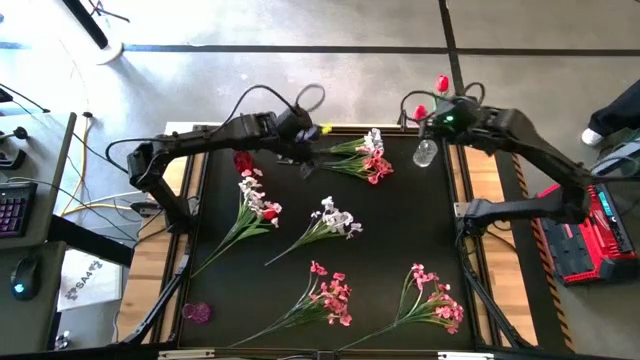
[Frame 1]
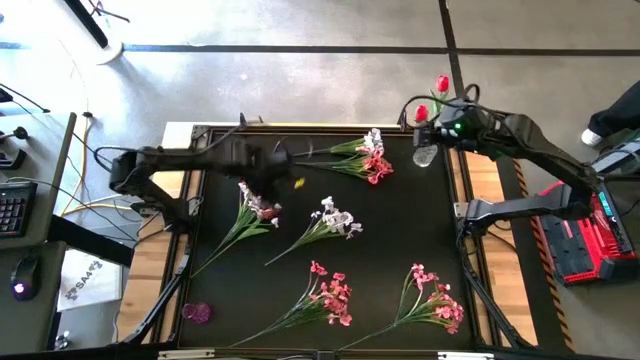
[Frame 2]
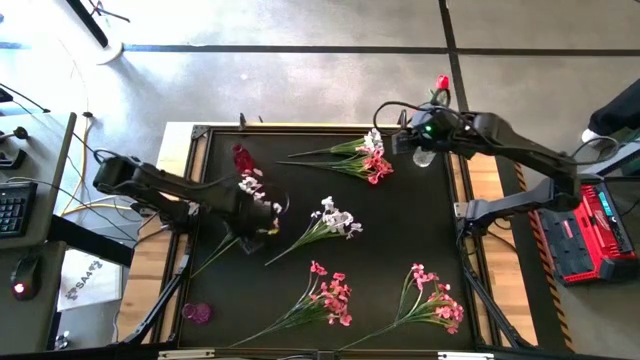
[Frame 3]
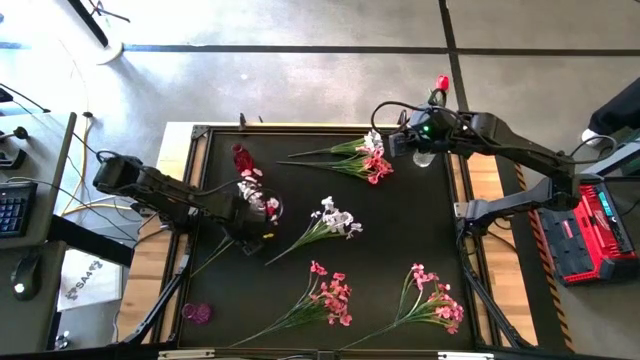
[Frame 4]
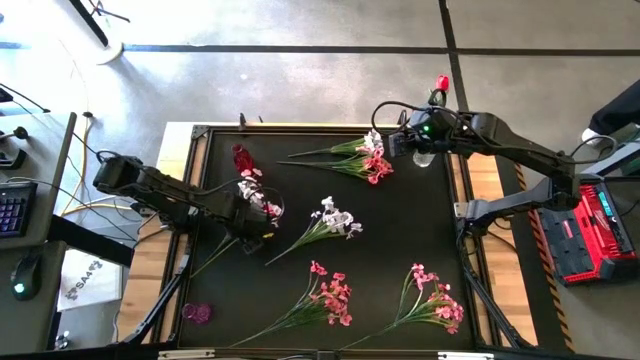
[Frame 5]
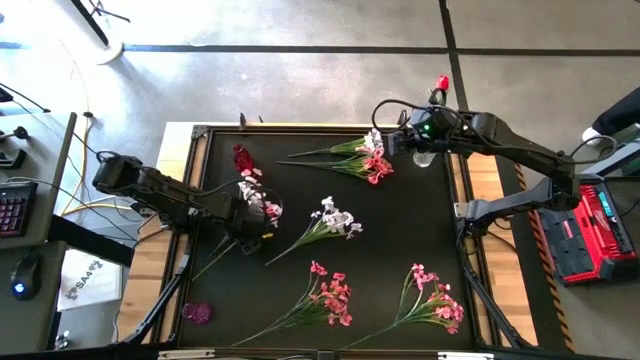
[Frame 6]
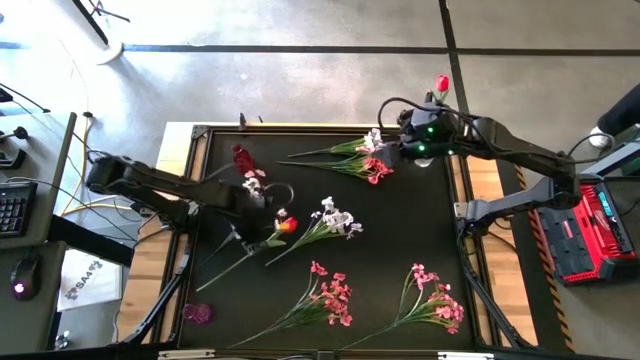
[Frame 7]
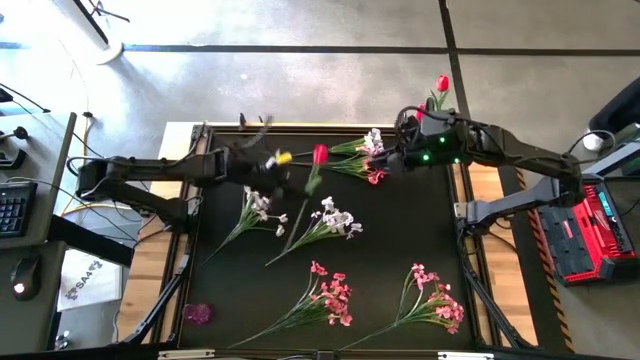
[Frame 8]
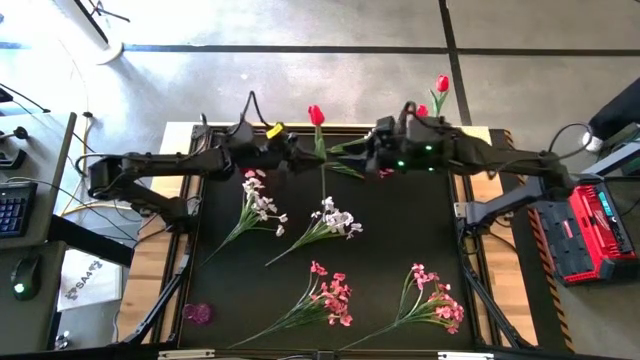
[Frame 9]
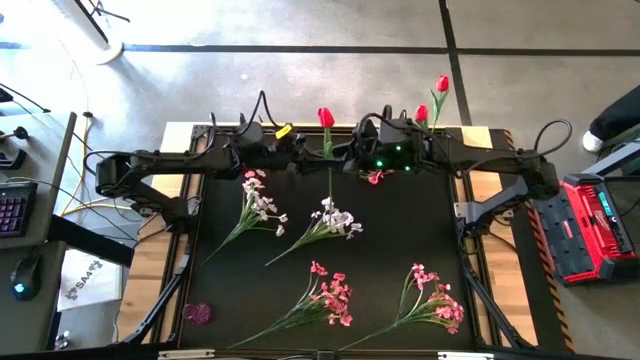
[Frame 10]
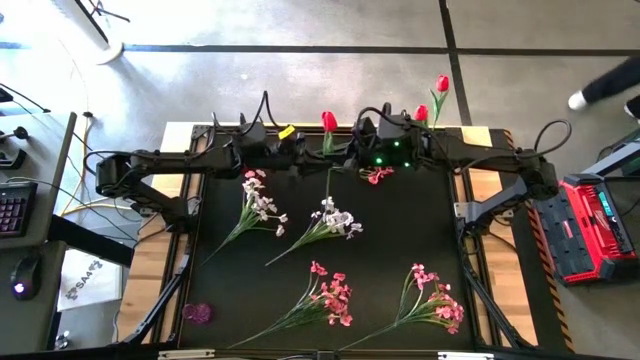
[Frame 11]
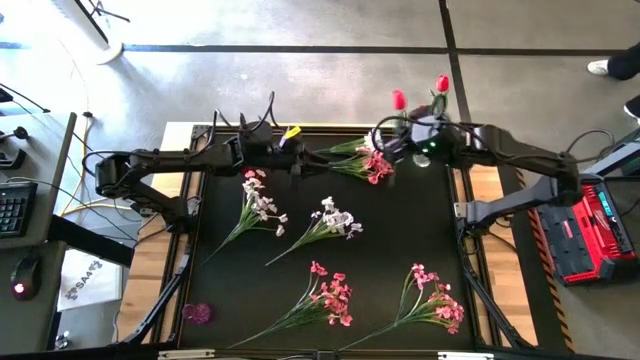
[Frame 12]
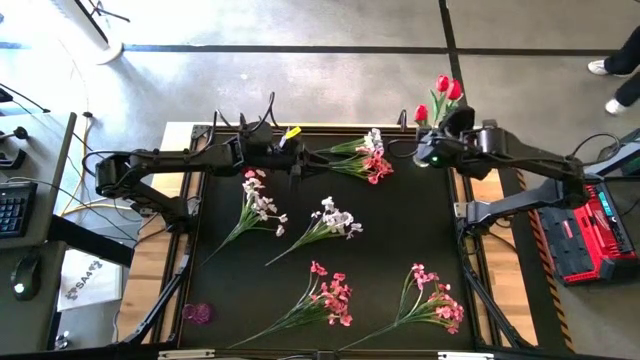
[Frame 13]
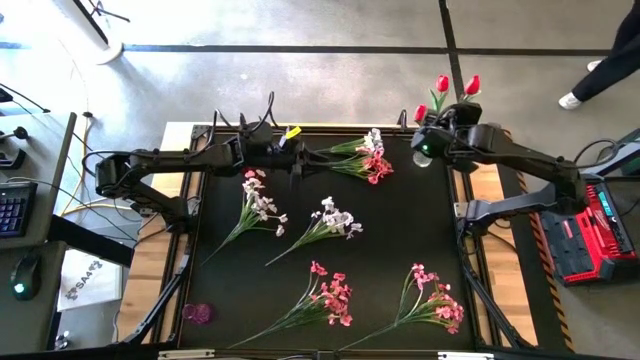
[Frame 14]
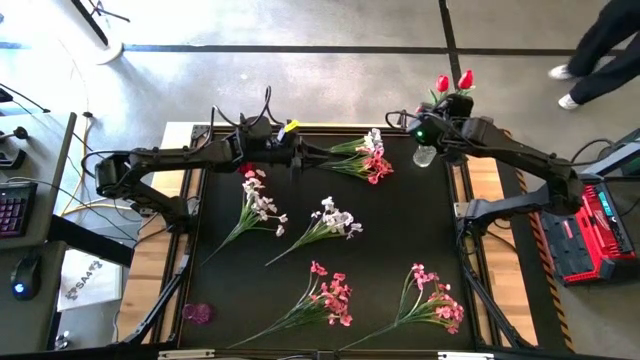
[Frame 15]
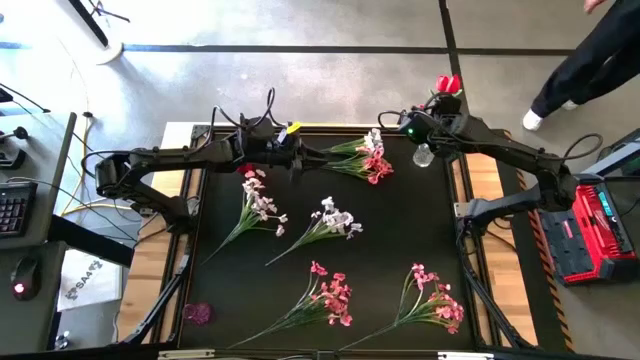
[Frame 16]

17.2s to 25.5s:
Task: Sort flowers into vase by color
Put the red tulip into the transparent vase

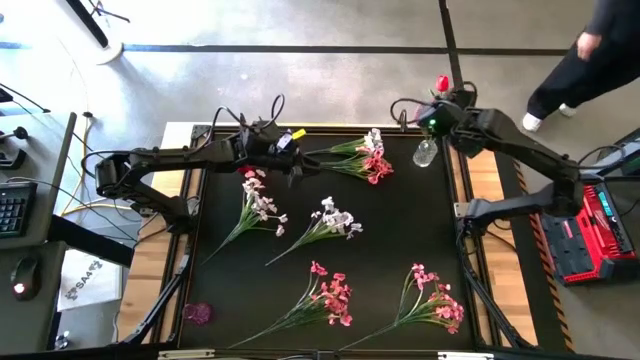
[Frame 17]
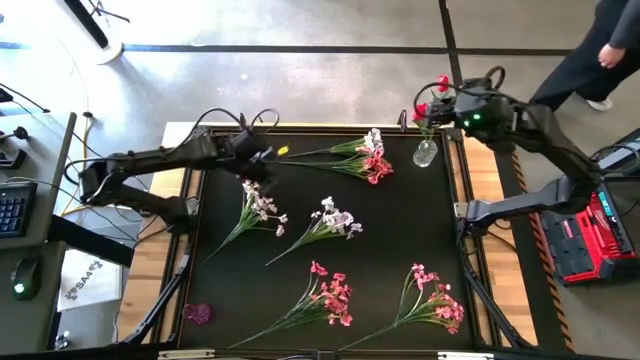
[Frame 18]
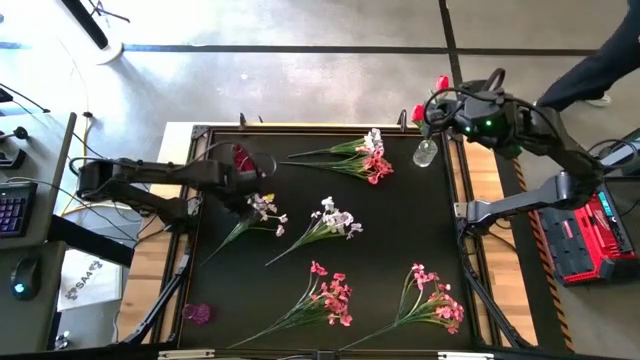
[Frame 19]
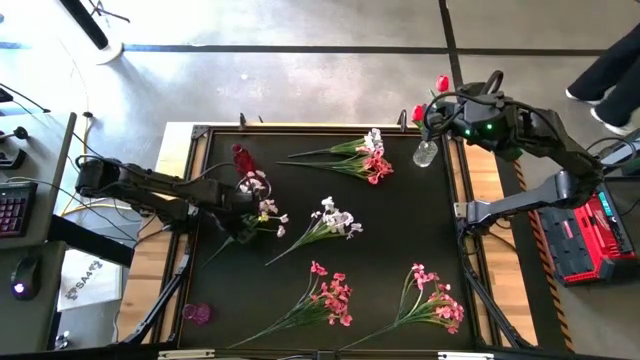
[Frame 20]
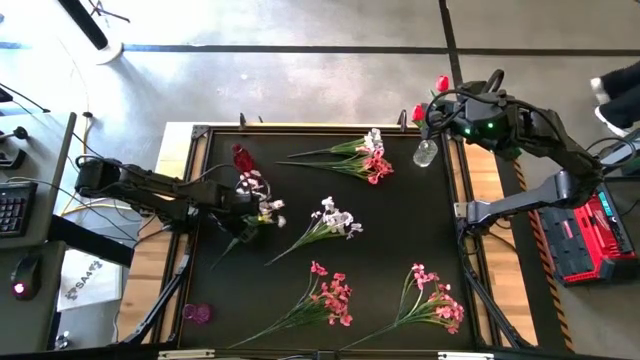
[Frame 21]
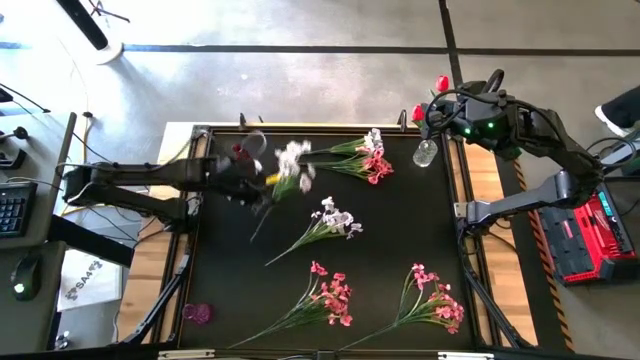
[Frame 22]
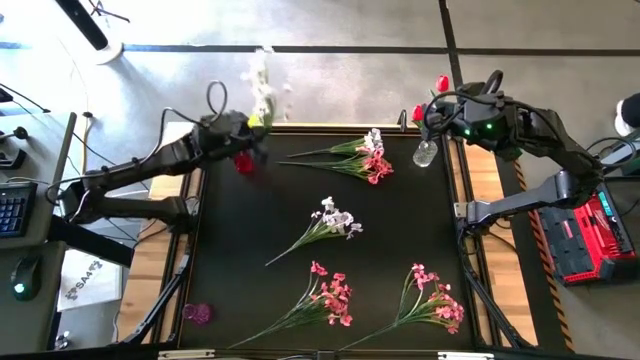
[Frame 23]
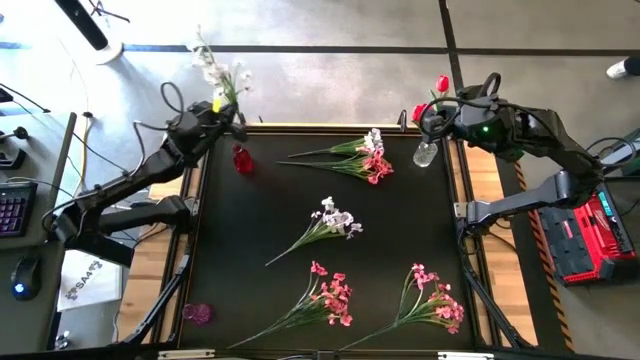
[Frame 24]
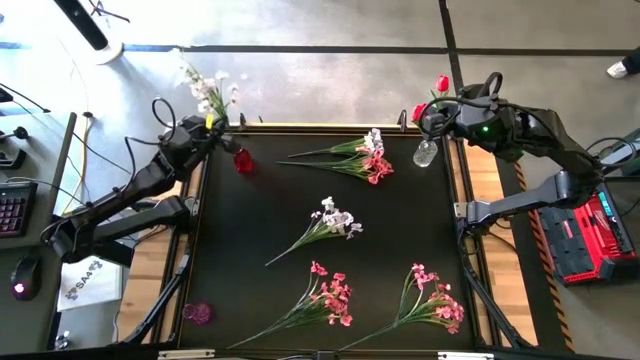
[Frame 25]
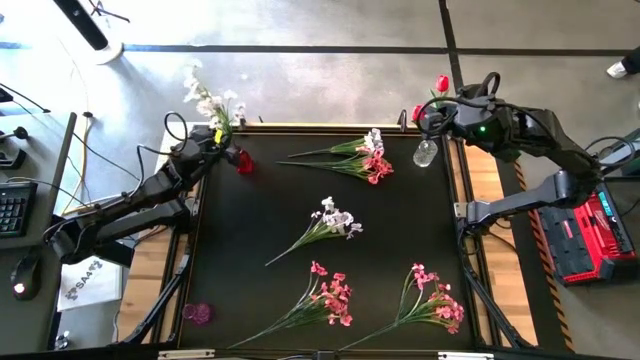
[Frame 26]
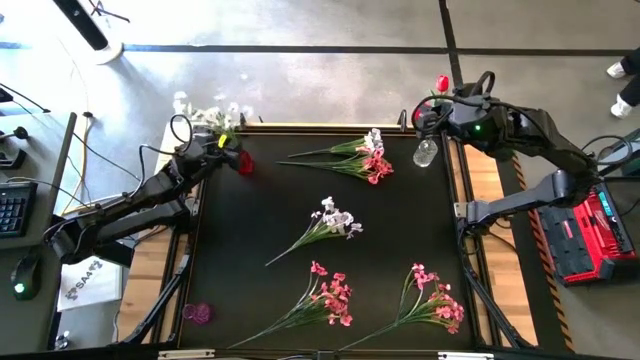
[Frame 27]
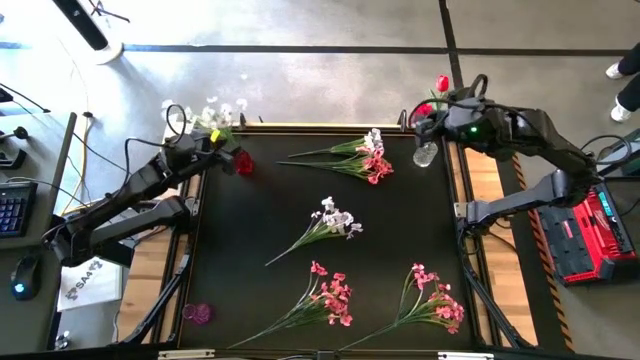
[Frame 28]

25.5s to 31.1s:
Put the left white flowers into the red vase

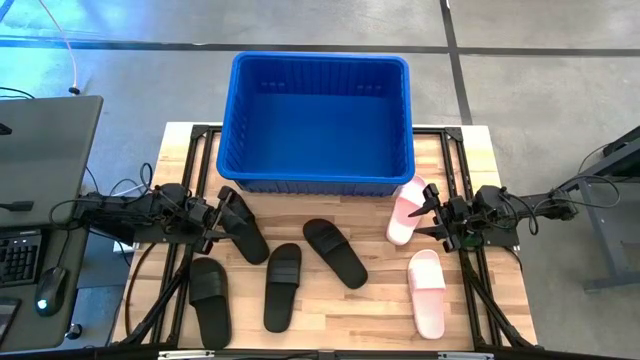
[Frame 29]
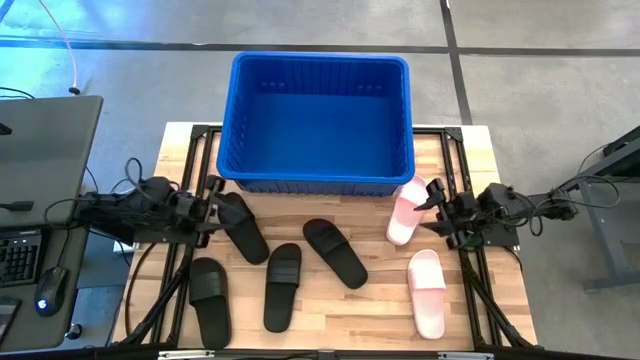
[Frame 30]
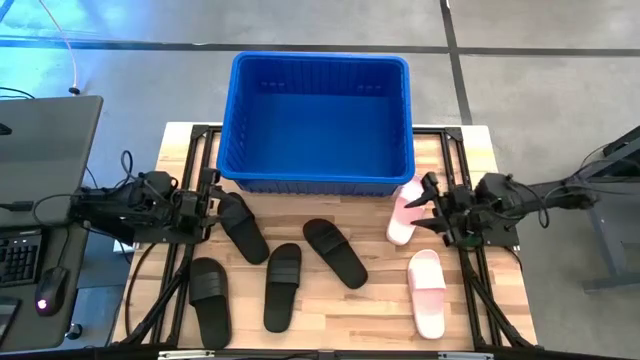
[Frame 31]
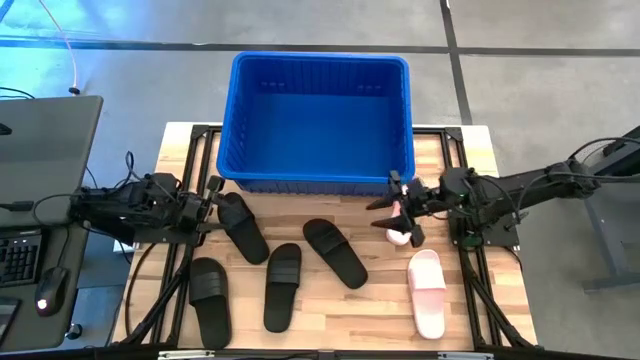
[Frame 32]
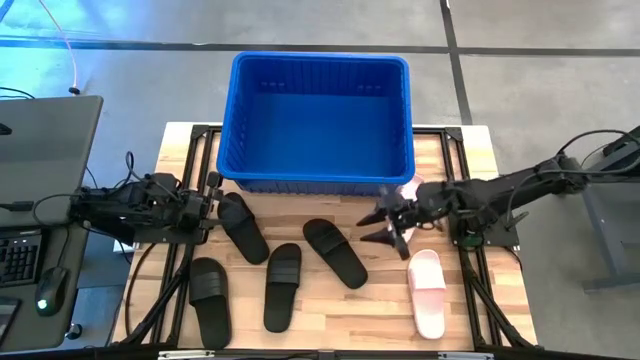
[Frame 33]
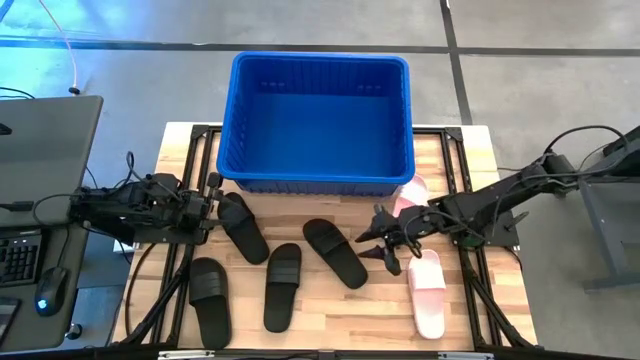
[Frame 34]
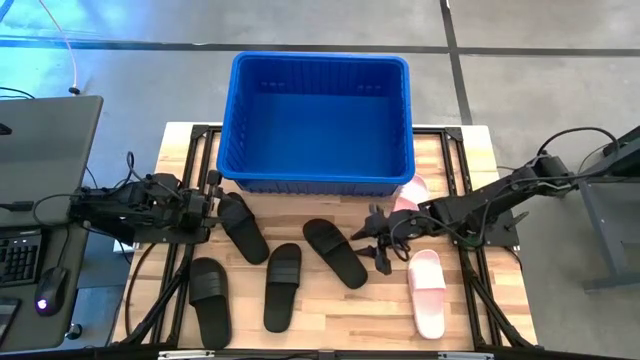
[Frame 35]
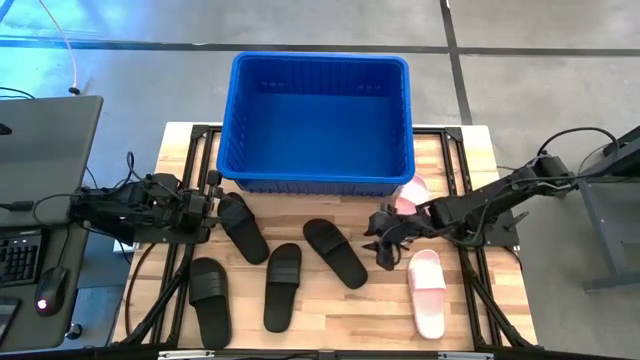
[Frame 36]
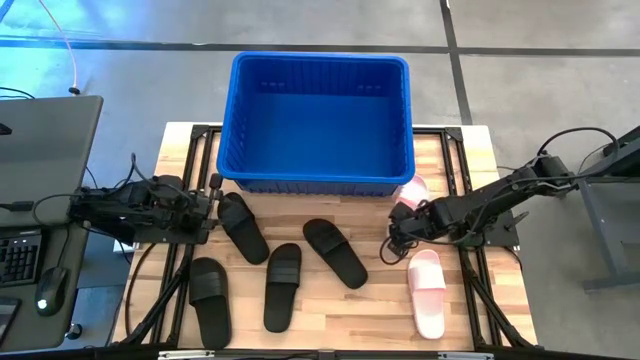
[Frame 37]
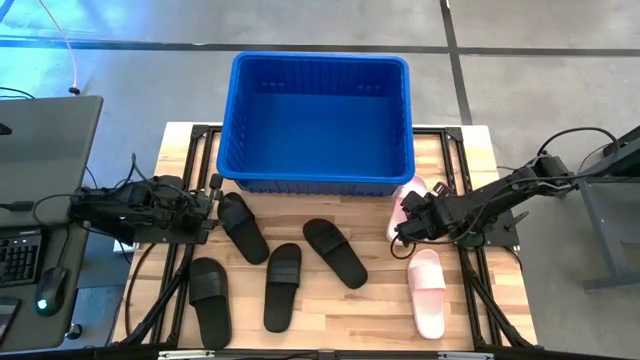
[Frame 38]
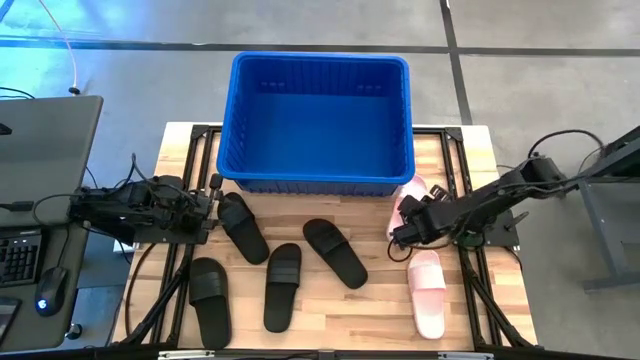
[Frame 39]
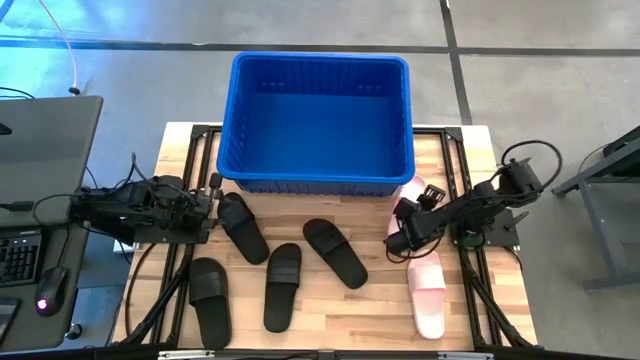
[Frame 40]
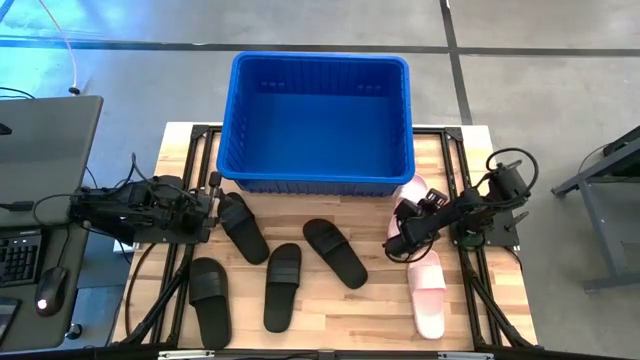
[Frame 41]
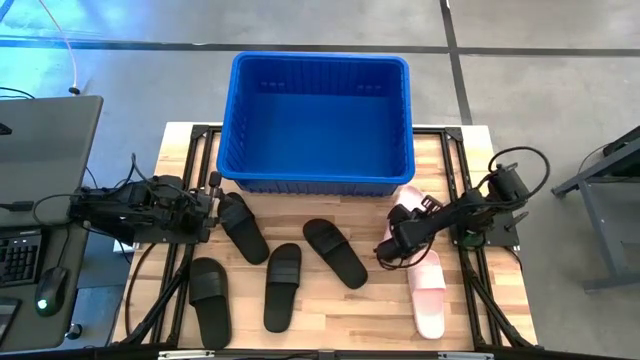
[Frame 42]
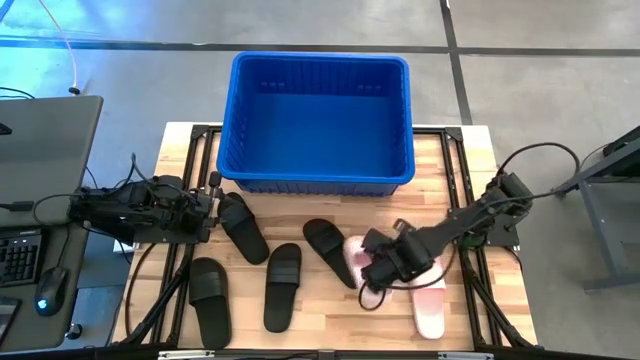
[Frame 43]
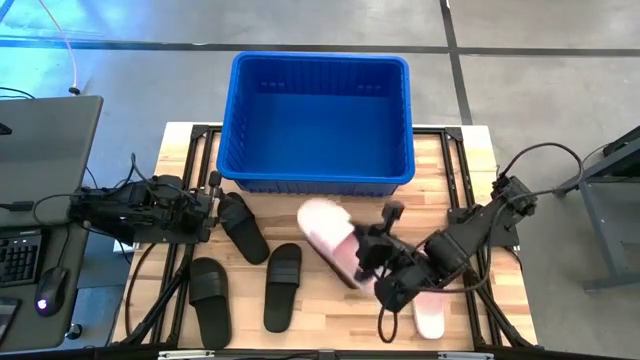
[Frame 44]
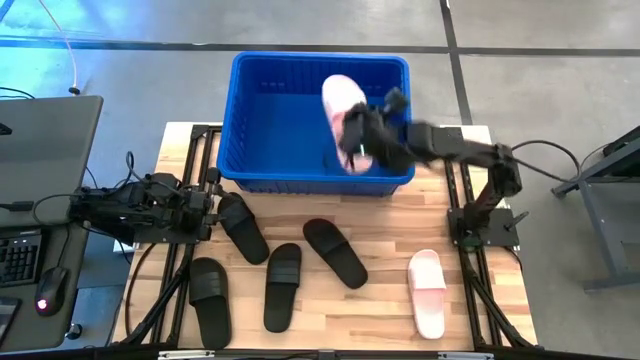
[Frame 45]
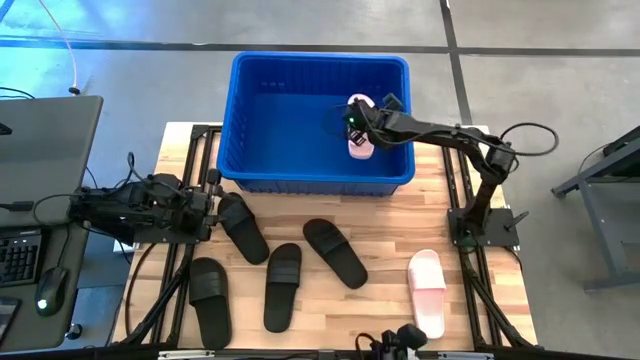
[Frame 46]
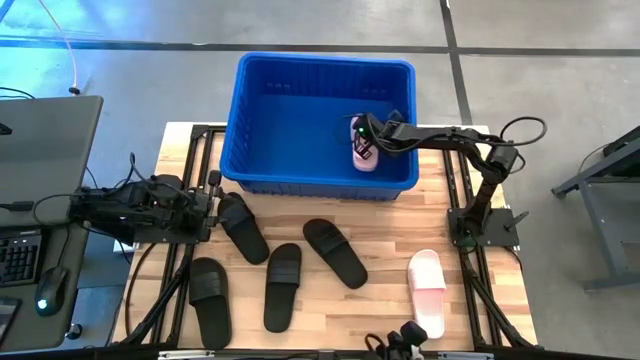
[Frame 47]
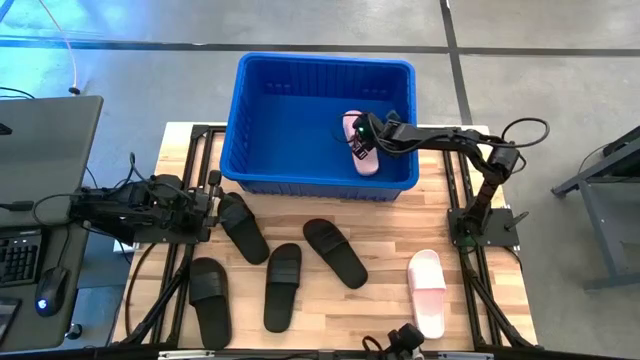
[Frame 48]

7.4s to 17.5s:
Task: Pick and place slides into bin
Put the top pink slipper into the blue basket
